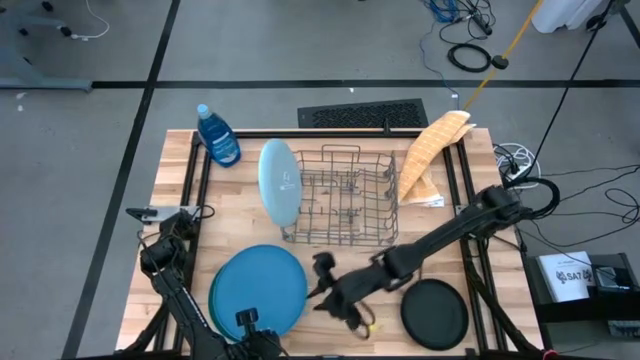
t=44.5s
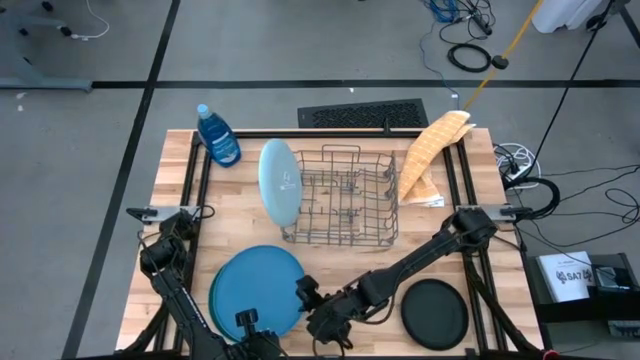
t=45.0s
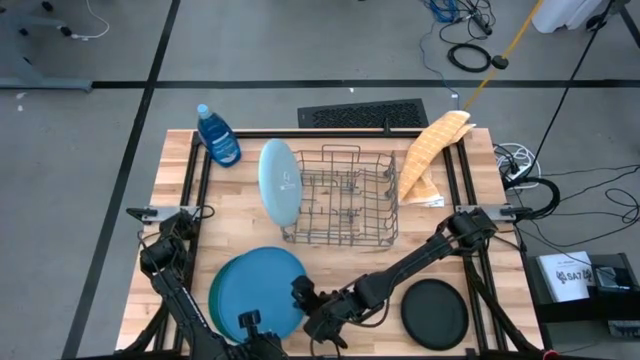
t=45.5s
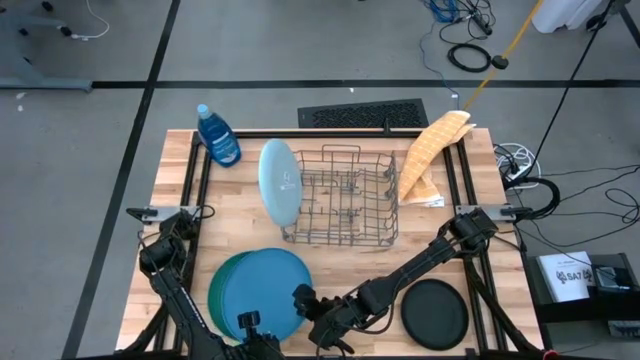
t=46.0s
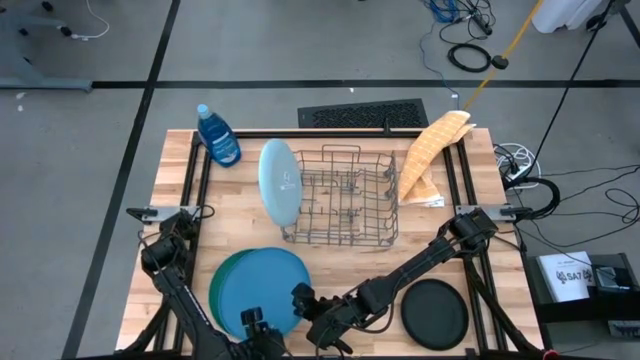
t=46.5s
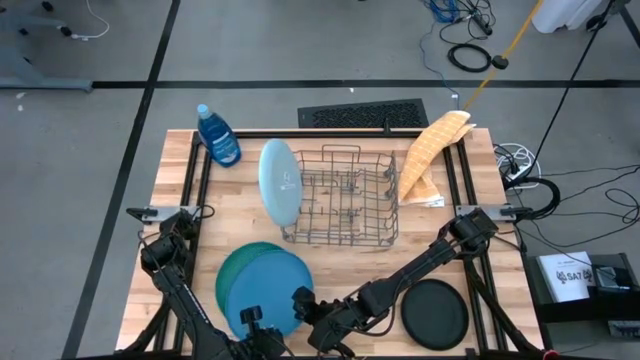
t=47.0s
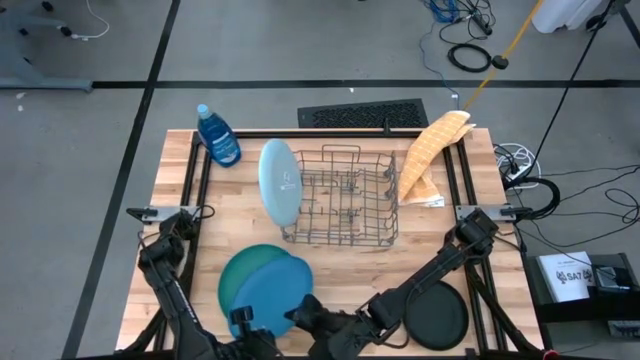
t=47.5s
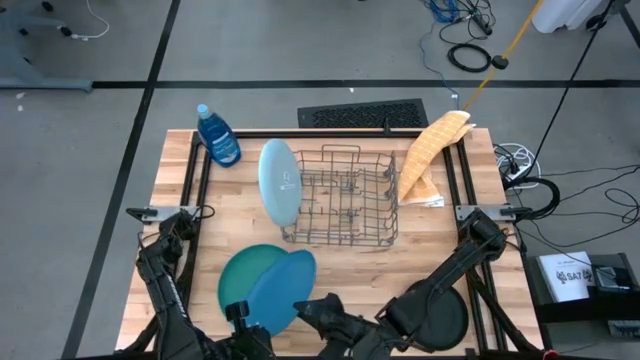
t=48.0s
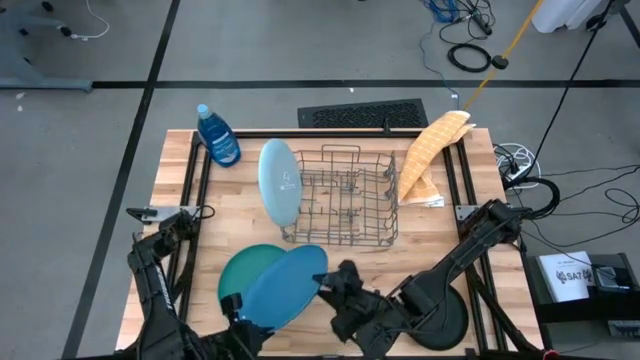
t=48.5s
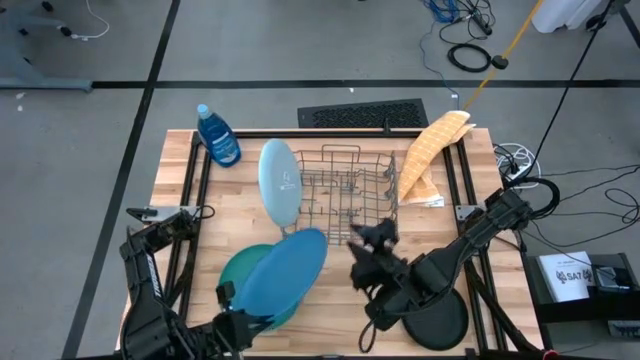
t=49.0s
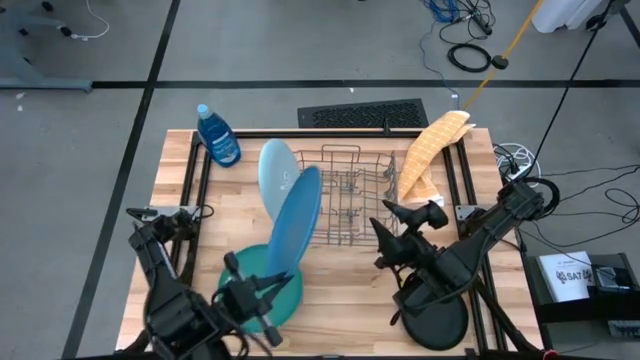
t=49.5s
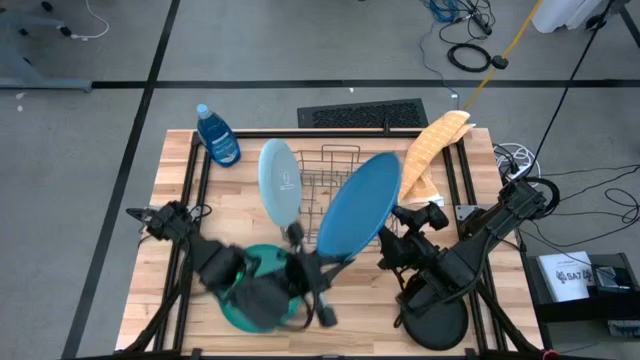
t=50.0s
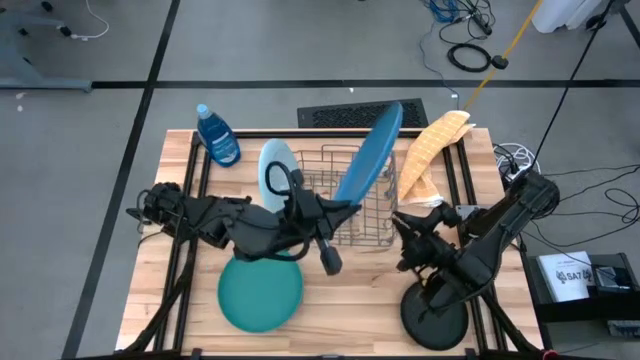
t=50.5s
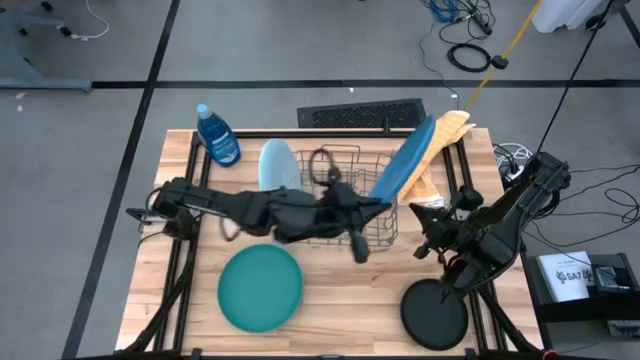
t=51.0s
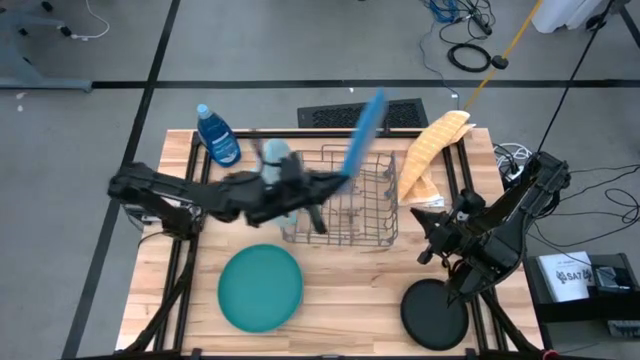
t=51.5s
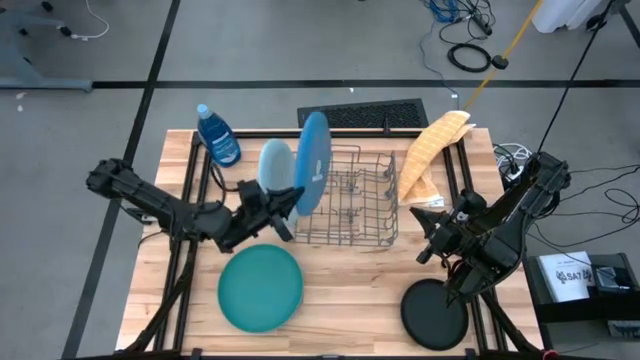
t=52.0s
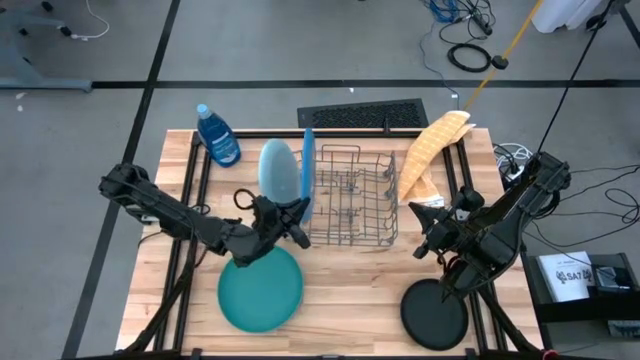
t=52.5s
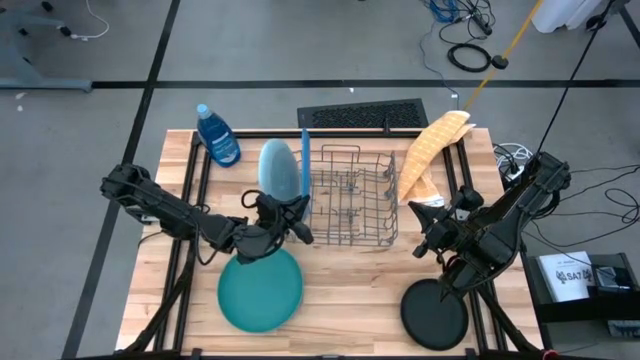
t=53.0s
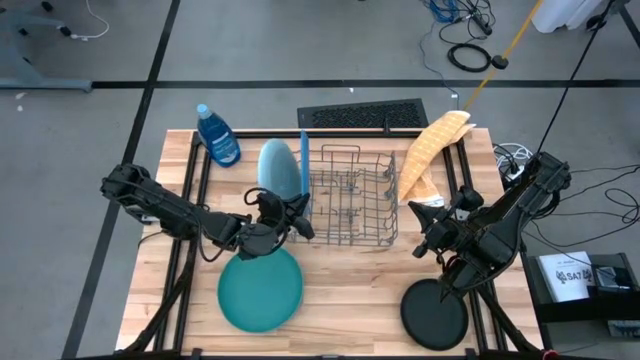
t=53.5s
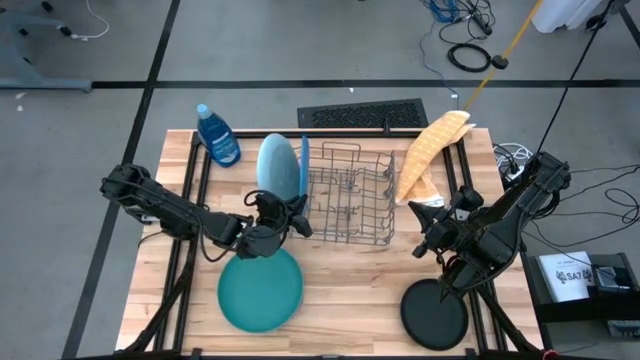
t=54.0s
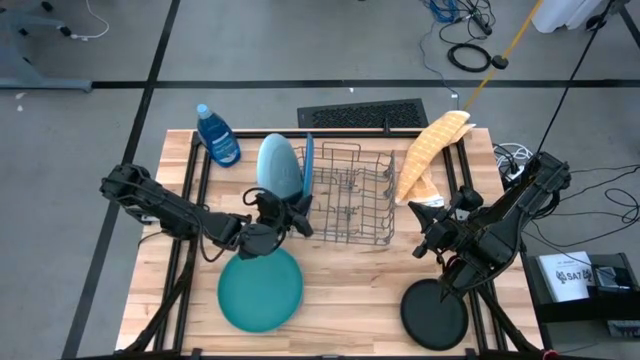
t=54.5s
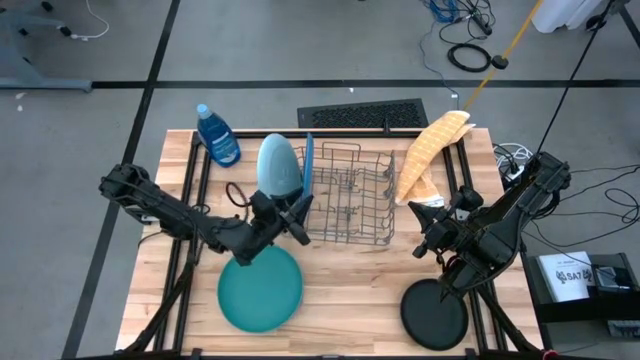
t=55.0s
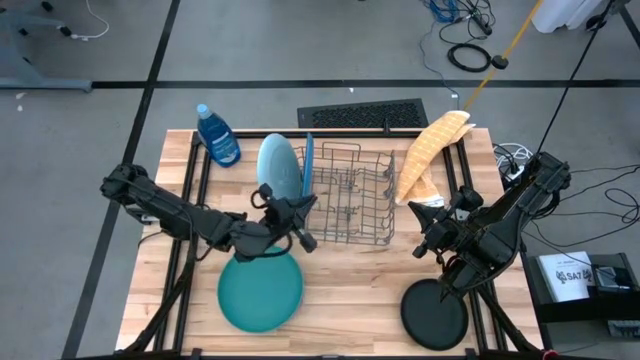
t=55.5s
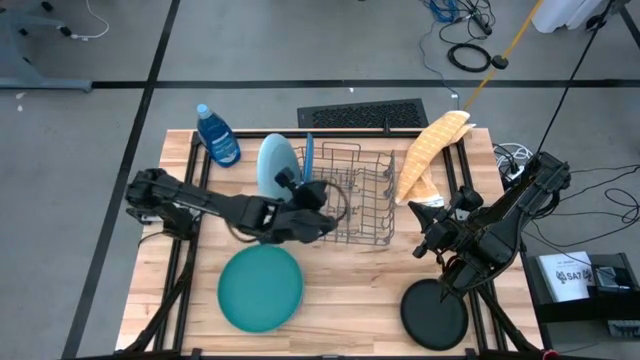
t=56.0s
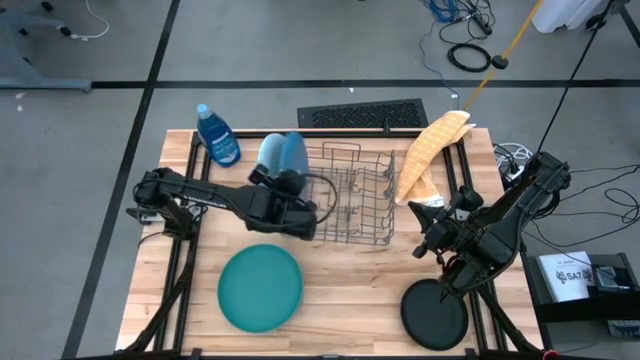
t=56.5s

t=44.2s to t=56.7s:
Task: Sort dishes
Put the blue plate into the dish rack

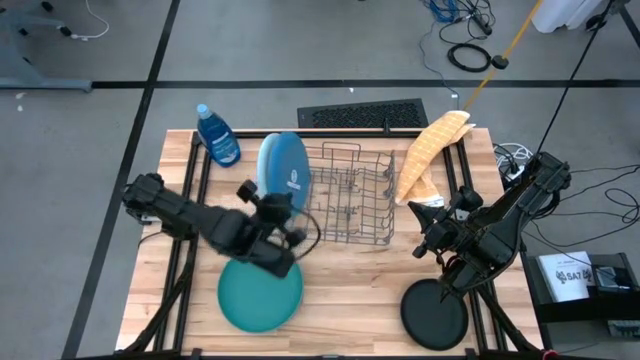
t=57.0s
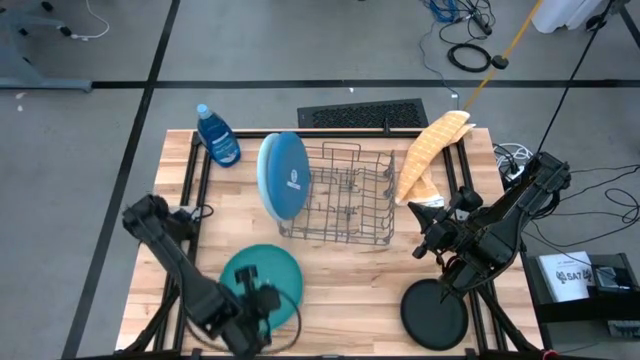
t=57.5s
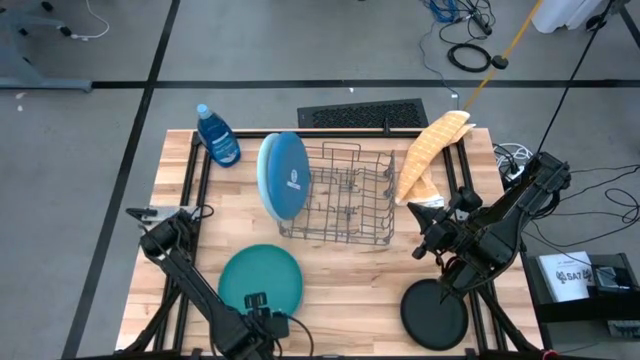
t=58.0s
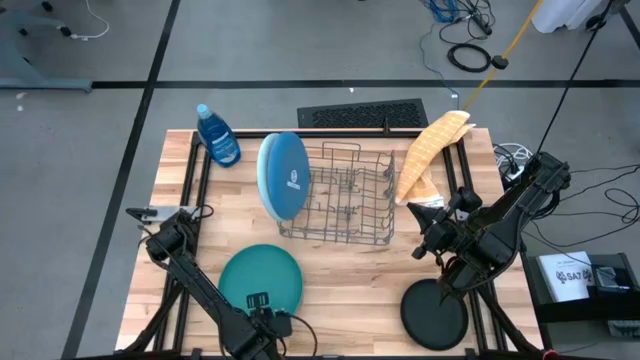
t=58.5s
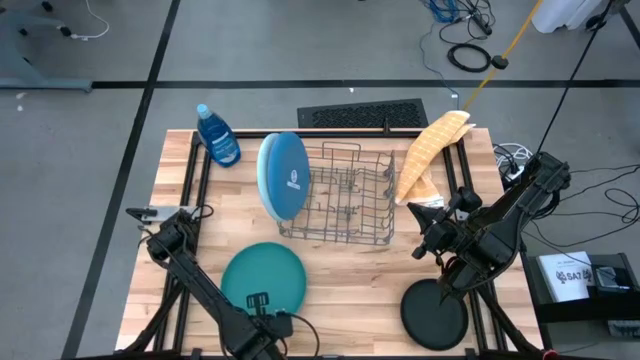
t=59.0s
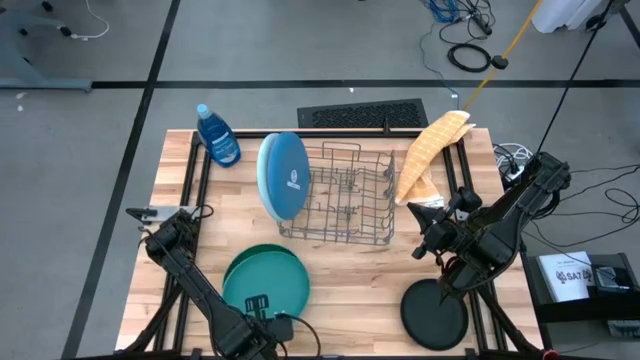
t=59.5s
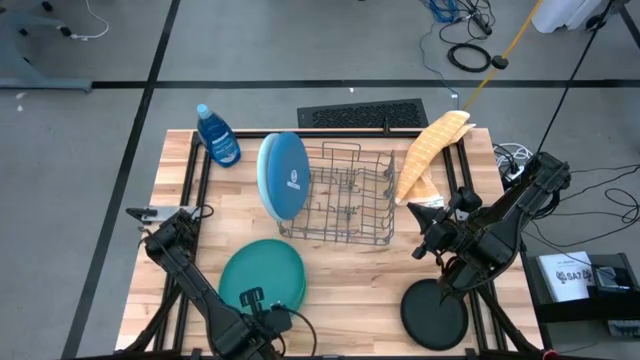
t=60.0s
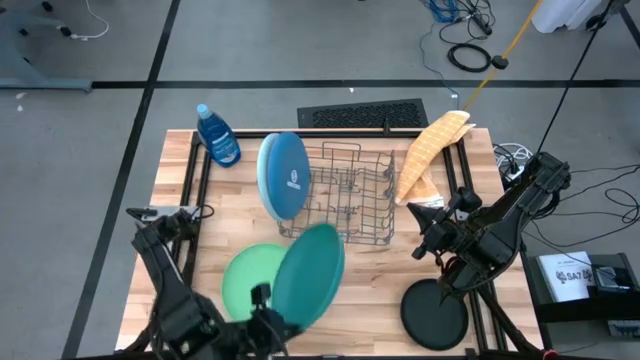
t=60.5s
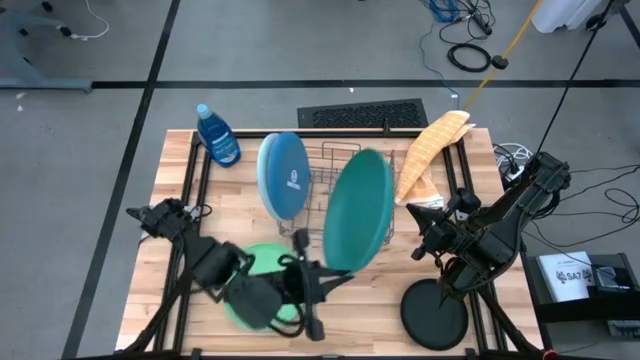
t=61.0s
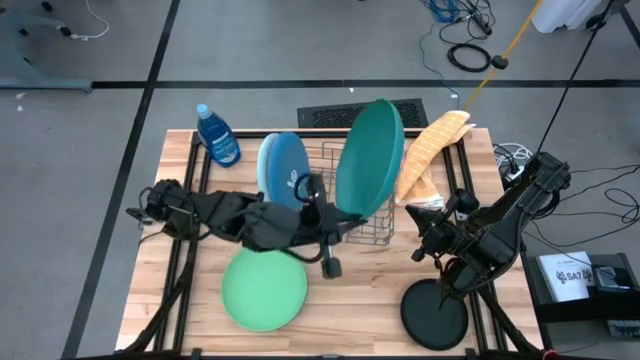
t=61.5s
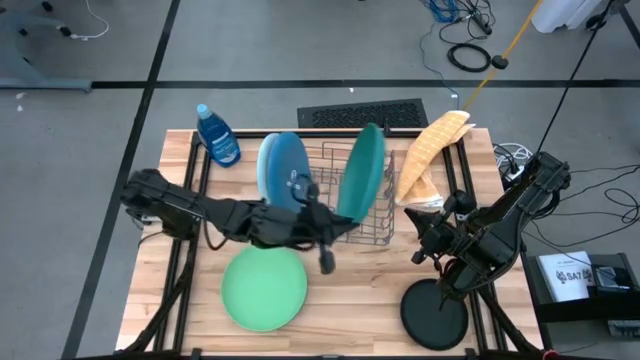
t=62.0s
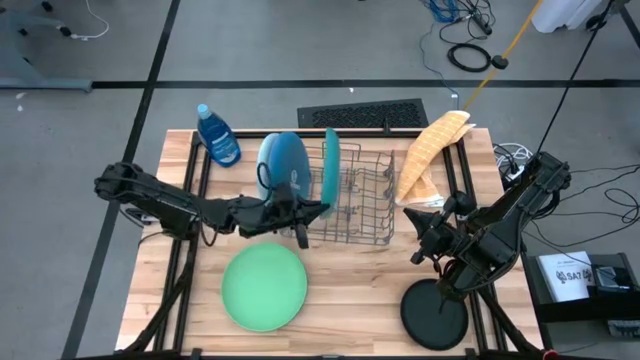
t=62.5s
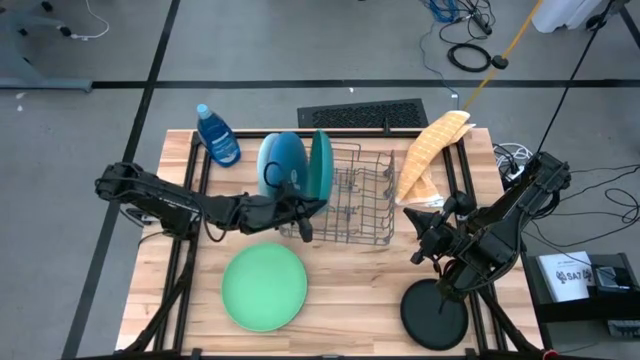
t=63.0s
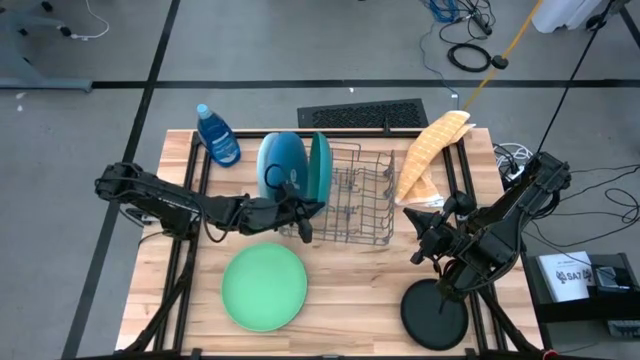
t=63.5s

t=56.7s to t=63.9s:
Put the green plate into the dish rack

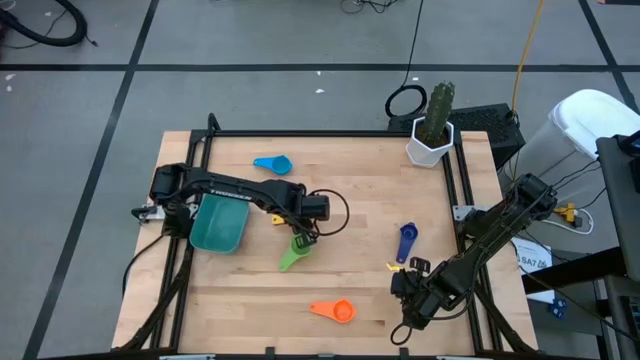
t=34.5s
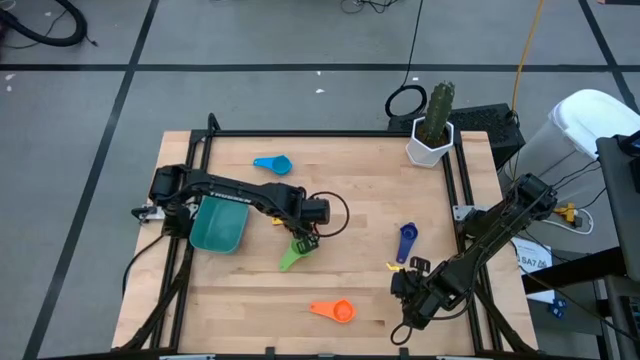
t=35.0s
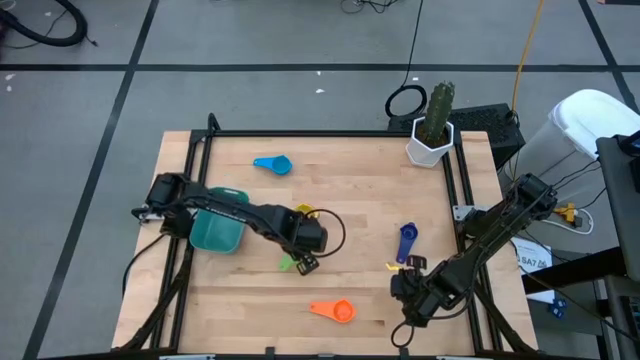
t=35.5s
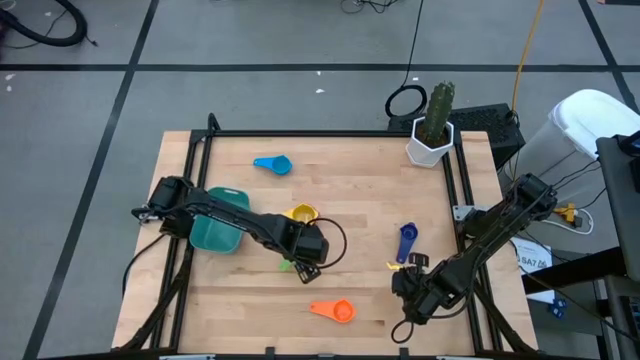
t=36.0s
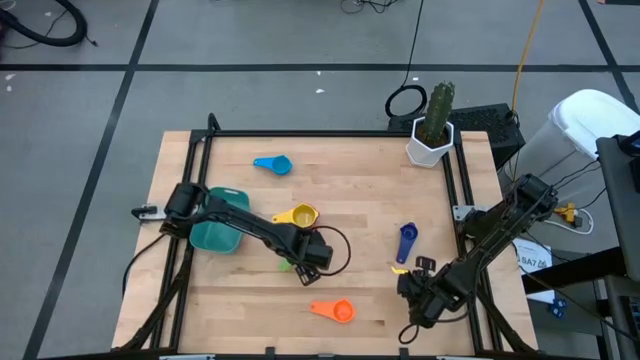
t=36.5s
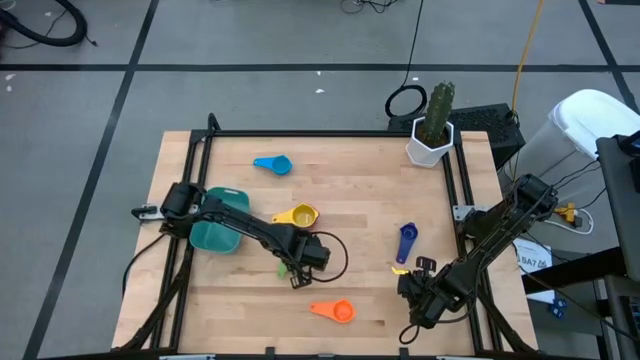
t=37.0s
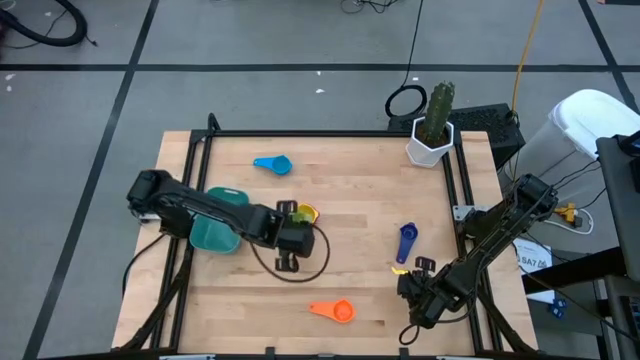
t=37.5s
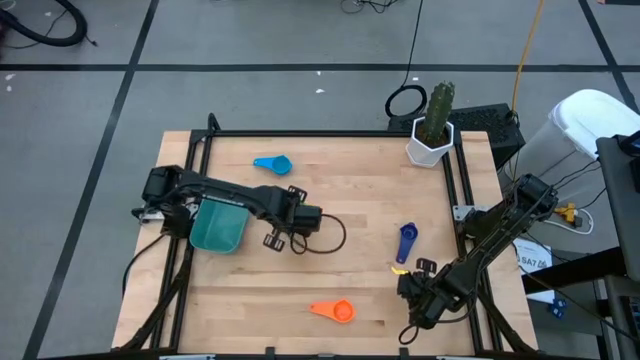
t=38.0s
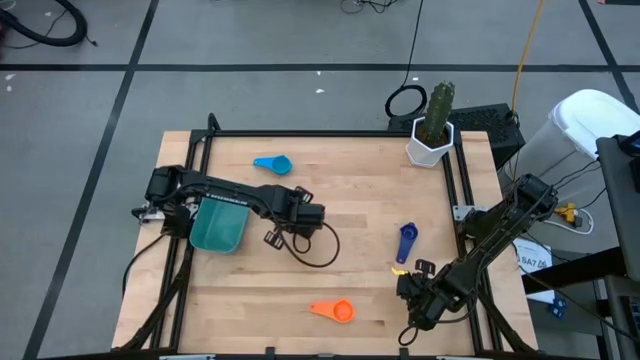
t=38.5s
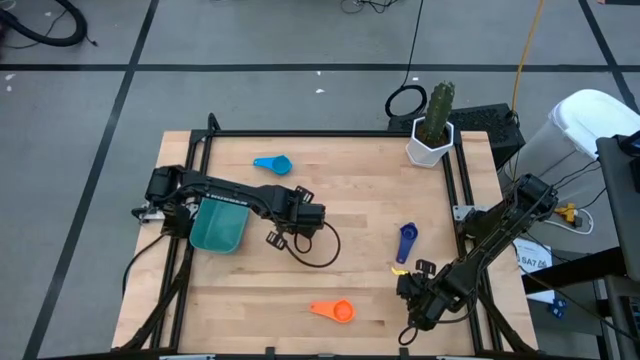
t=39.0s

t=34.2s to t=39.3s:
Task: Nest measuring cups in basket
Stack the green measuring cup into the yellow measuring cup
